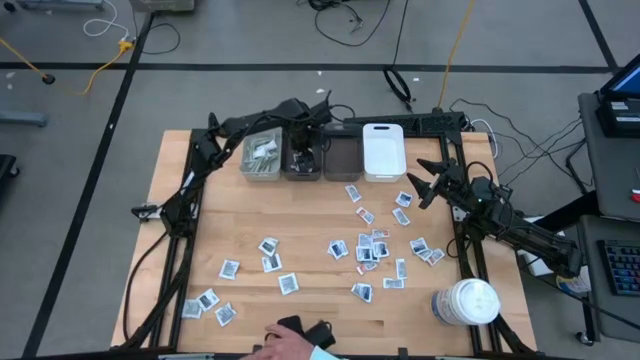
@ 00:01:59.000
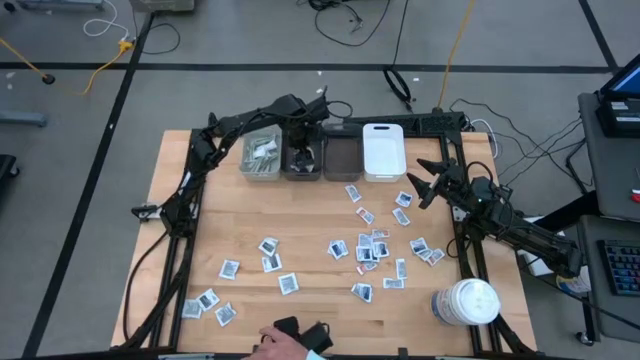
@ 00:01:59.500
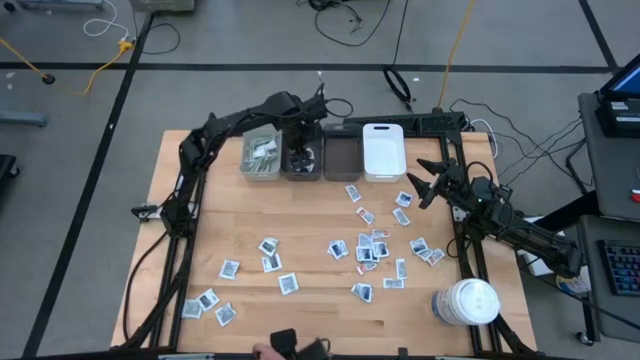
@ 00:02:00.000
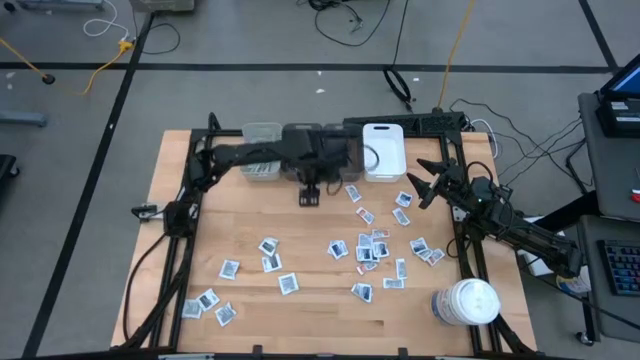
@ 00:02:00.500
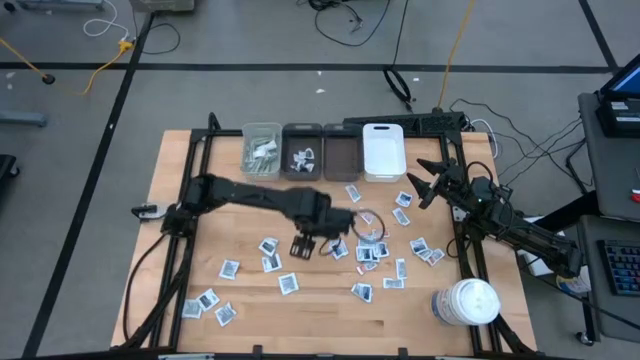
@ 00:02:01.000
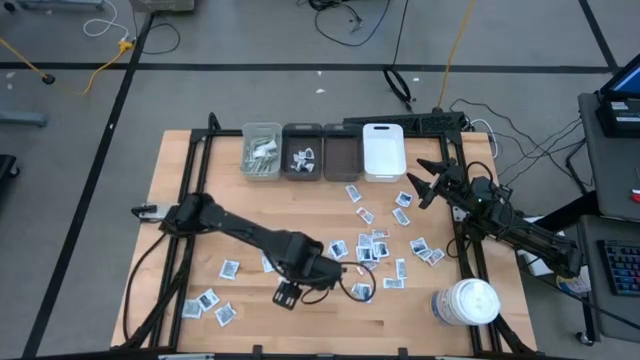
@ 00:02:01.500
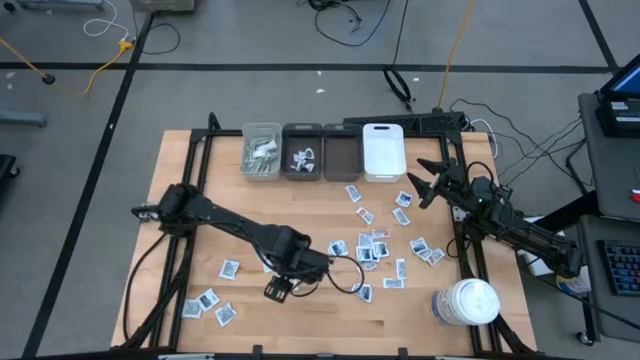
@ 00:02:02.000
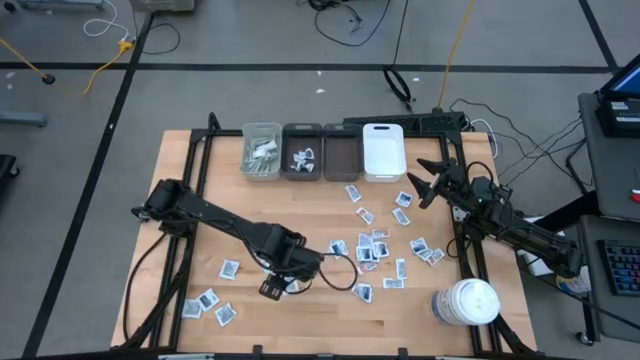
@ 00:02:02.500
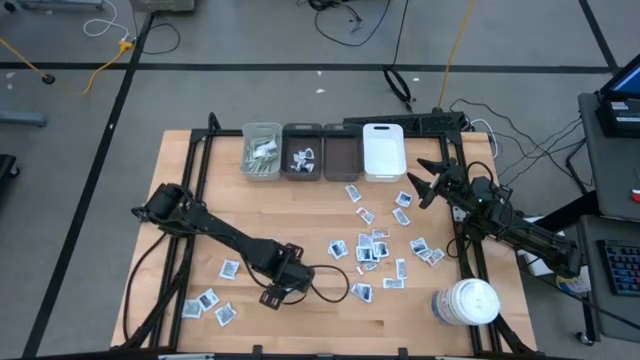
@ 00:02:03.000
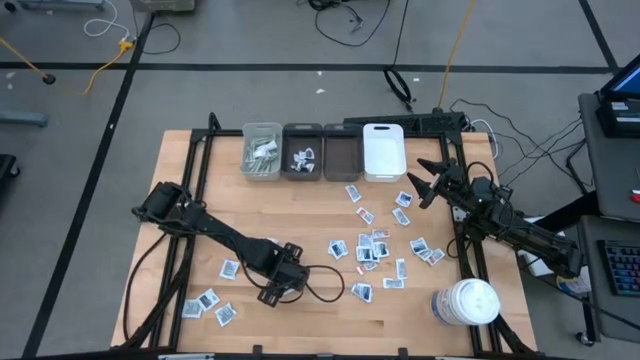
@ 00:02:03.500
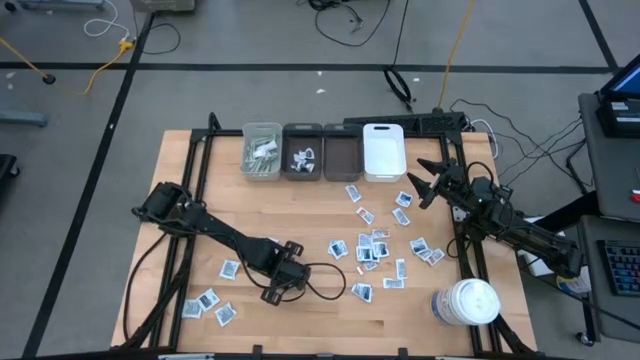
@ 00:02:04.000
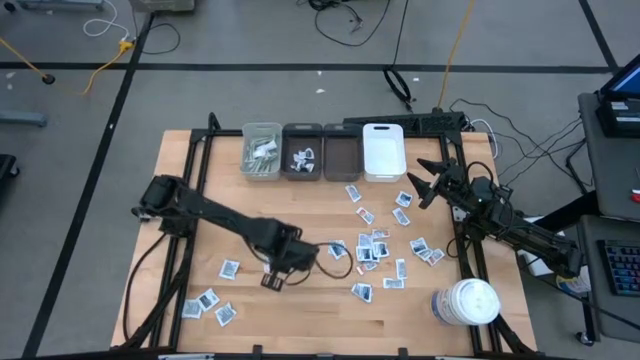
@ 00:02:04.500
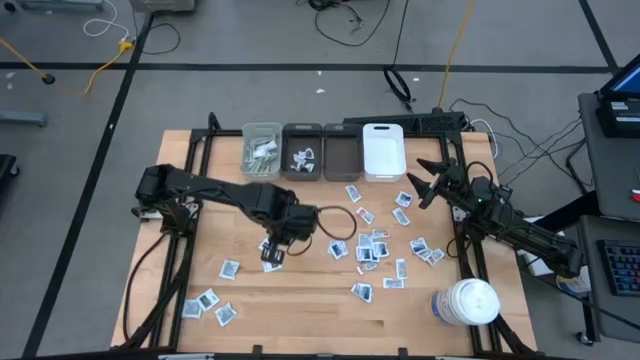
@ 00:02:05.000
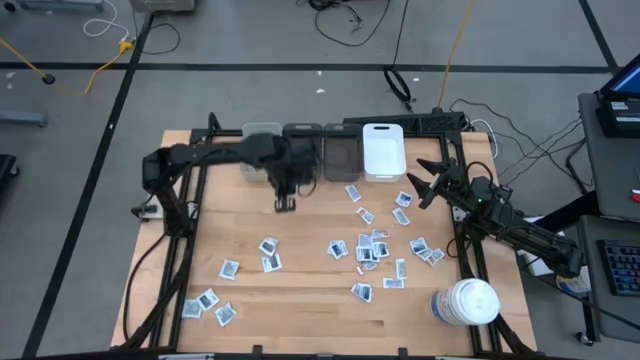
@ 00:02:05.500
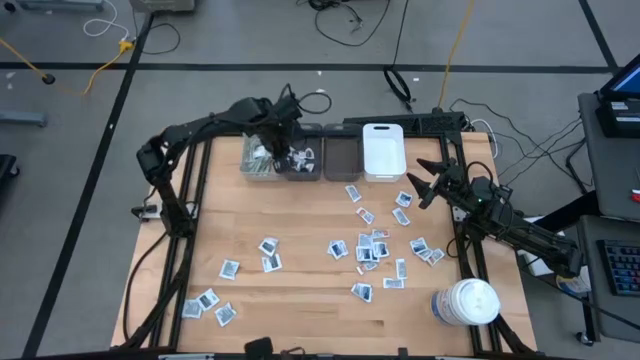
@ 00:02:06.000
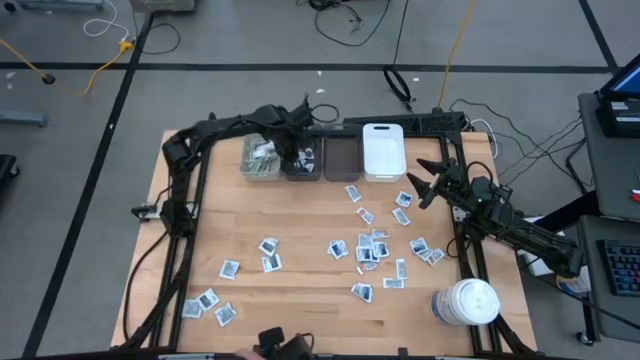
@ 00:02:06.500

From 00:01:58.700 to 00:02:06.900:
Task: Pick & Place First Aid Supplies
Put the towelette pack into the left black bin

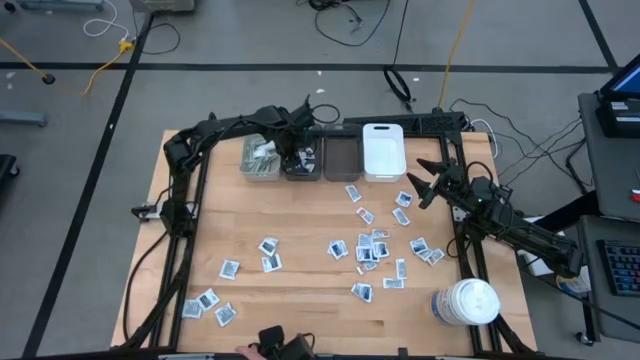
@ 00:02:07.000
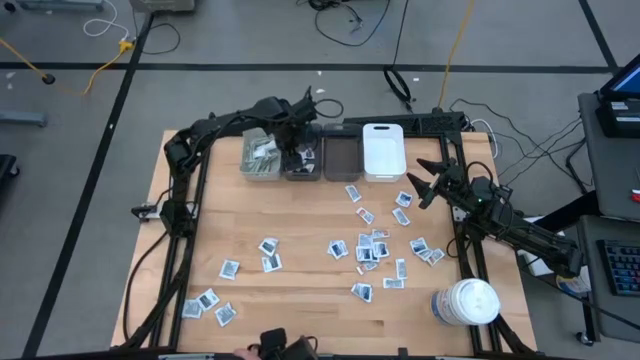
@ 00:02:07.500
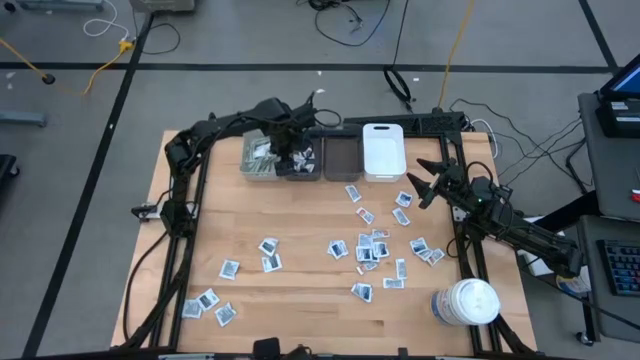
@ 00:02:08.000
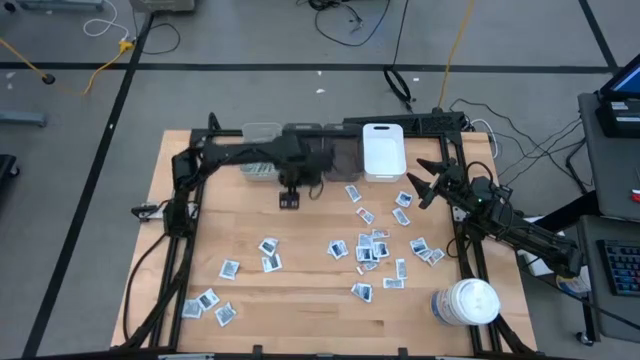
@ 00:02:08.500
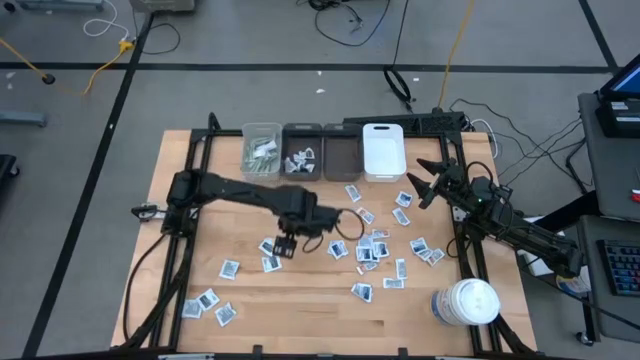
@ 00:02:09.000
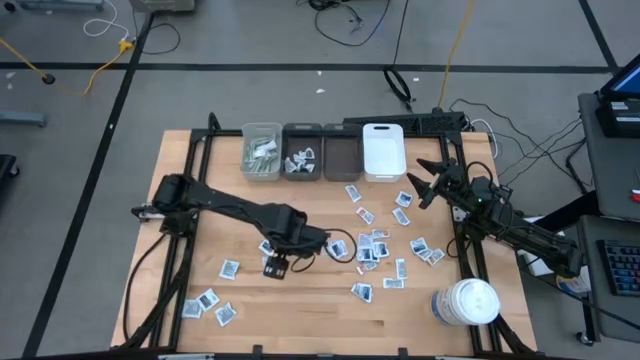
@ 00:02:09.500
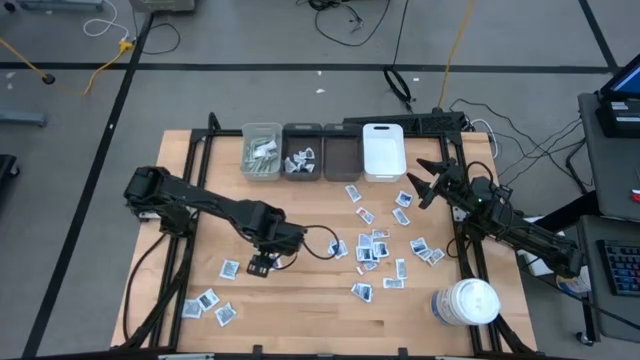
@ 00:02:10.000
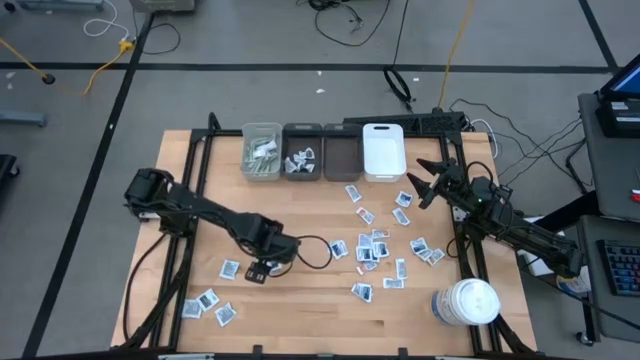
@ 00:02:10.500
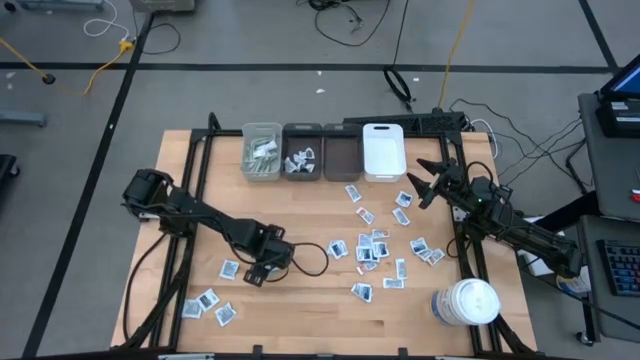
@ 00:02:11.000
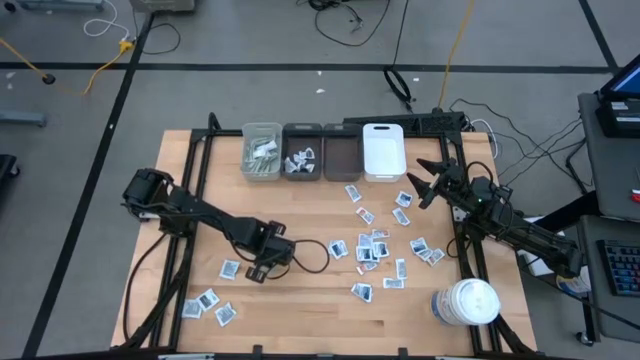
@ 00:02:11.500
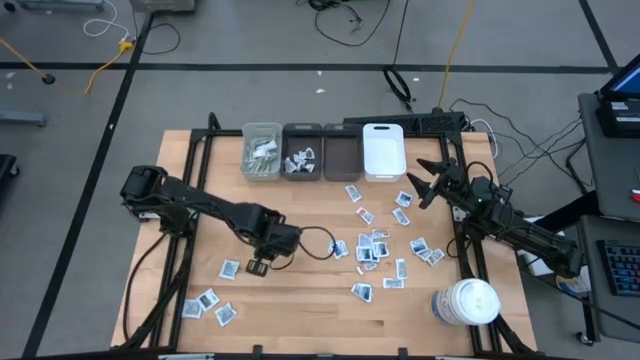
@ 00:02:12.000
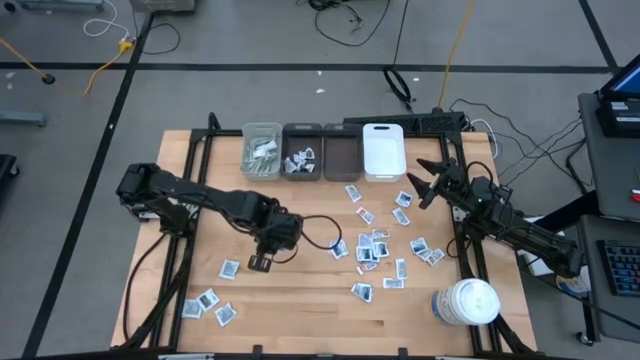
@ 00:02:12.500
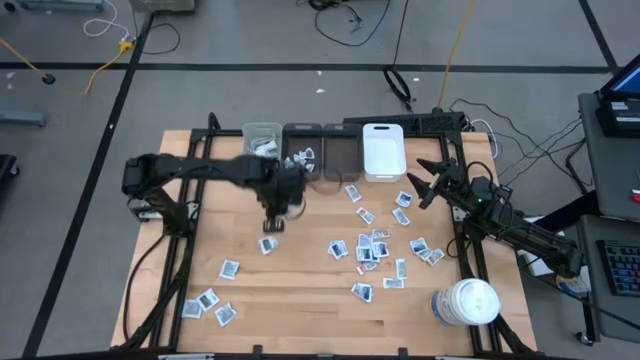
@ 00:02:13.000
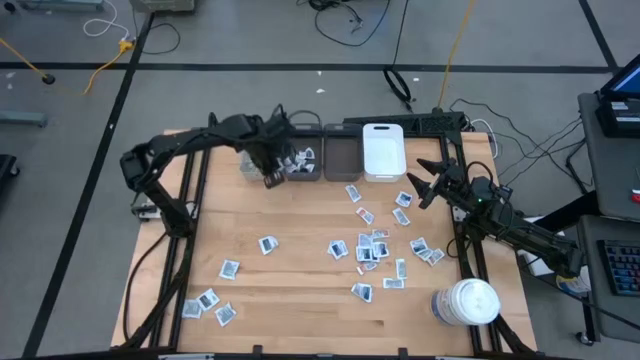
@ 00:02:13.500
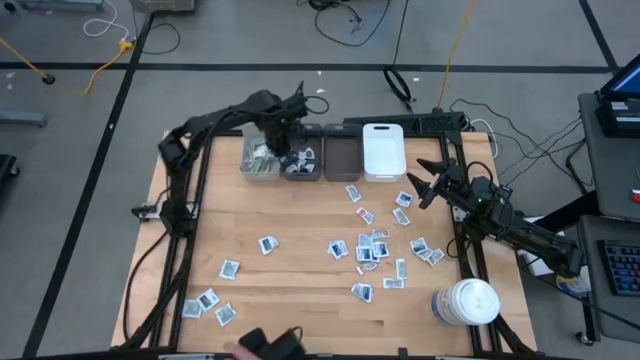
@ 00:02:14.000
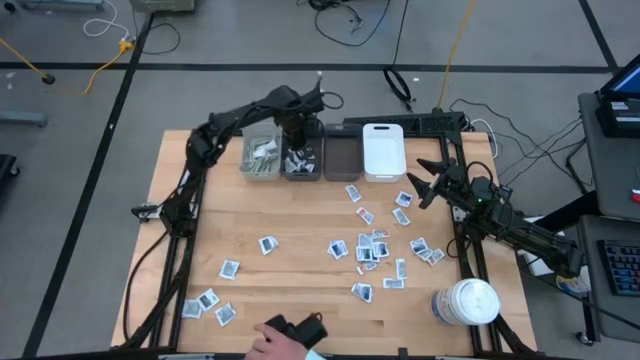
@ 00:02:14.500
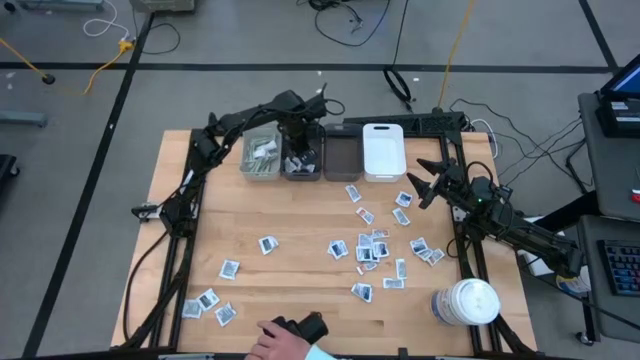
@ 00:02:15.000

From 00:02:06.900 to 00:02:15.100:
Put the towelette pack into the left black bin

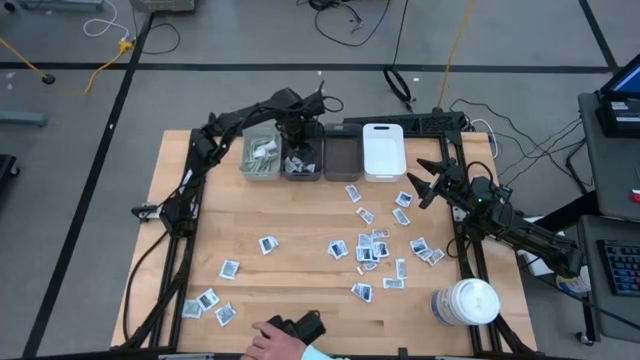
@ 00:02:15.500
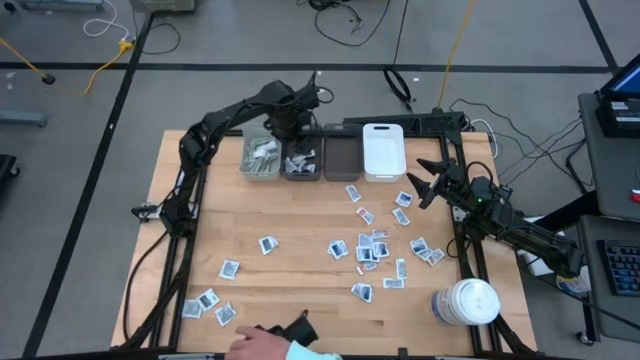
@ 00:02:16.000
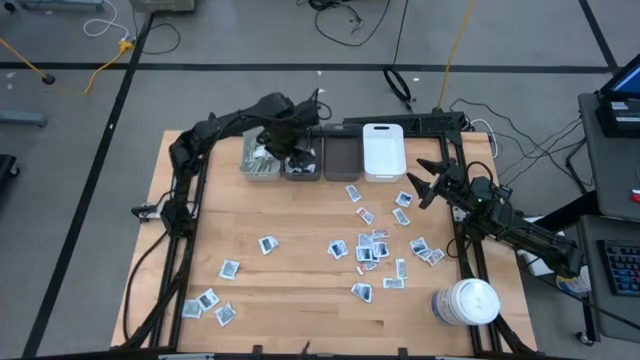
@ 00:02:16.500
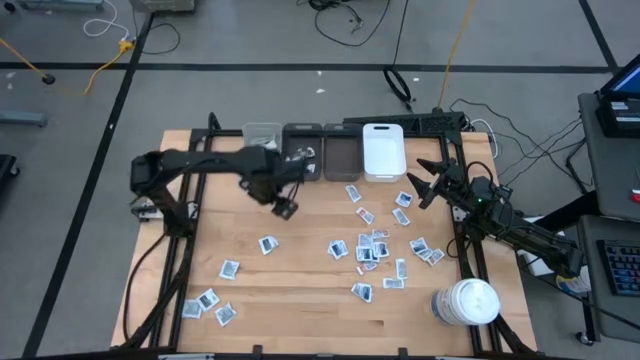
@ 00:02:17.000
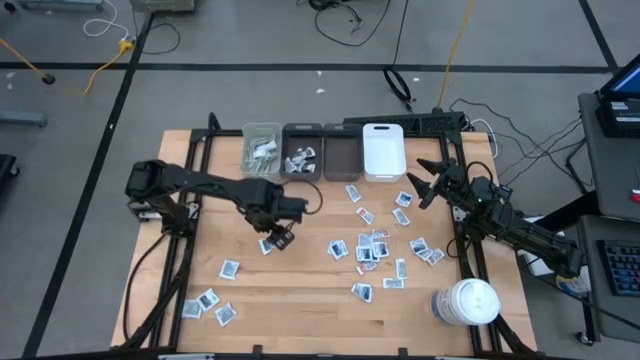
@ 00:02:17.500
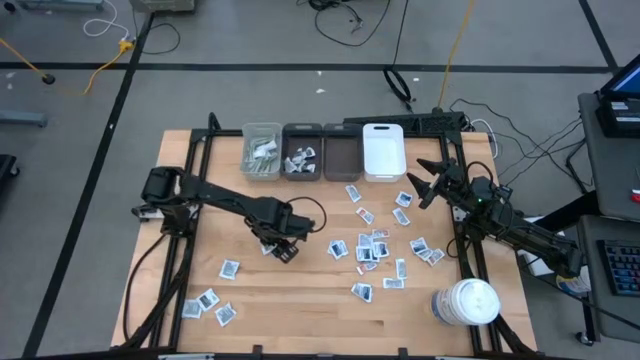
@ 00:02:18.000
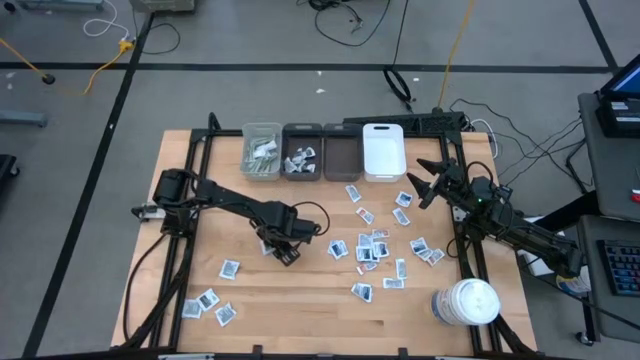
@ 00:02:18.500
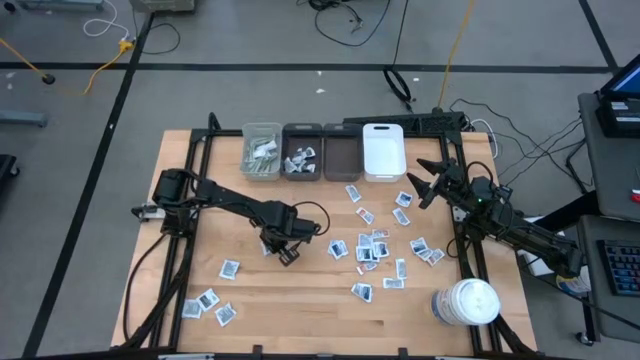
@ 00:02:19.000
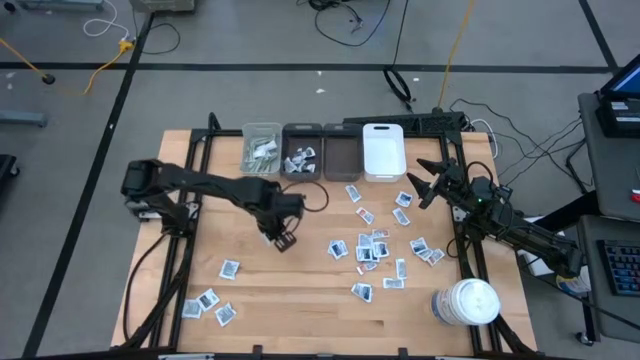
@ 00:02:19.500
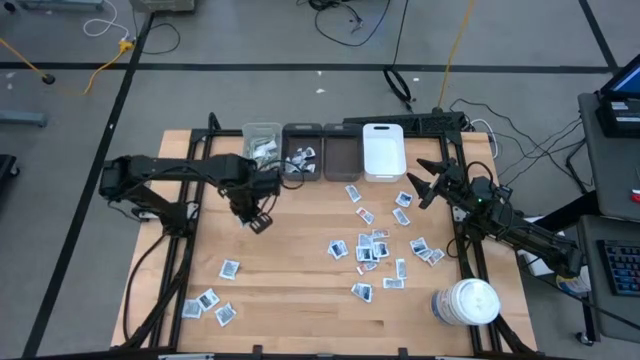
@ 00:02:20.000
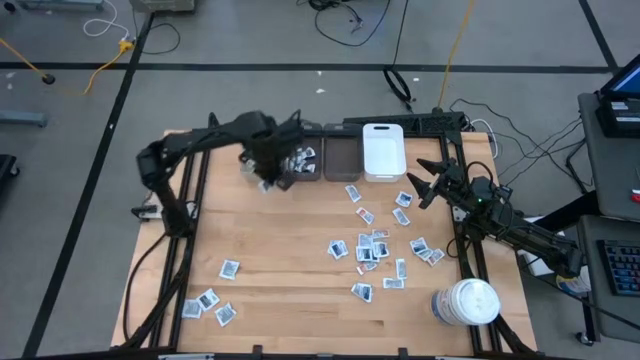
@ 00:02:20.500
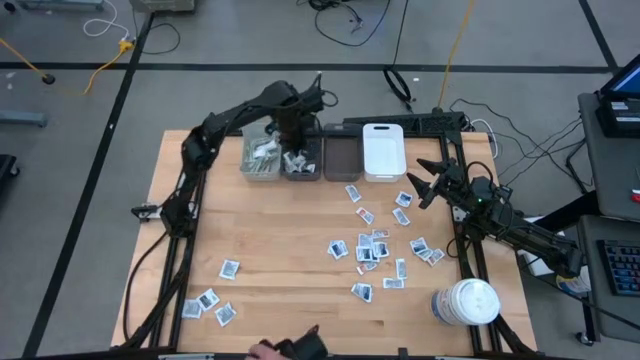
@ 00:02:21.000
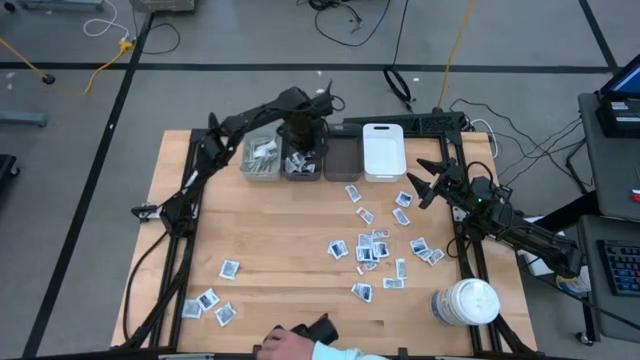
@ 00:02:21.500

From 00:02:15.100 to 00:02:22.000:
Put the towelette pack into the left black bin
